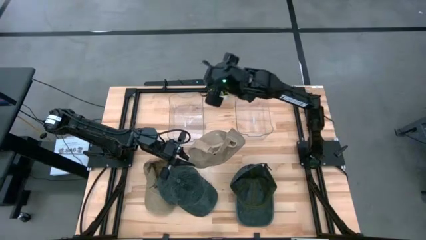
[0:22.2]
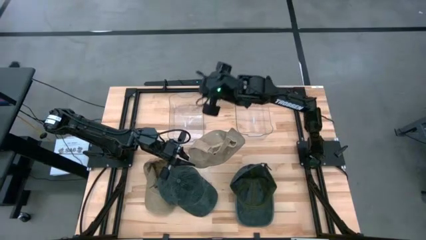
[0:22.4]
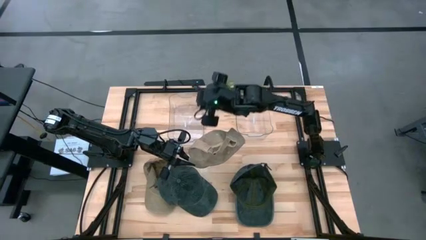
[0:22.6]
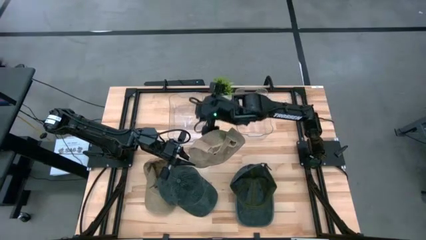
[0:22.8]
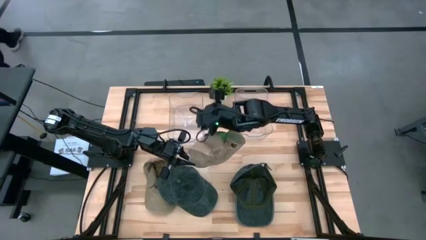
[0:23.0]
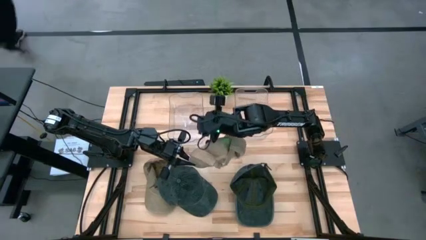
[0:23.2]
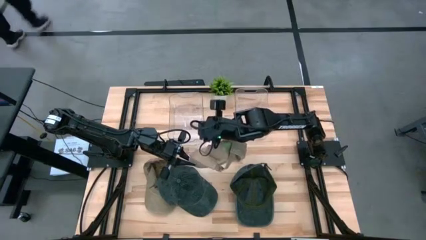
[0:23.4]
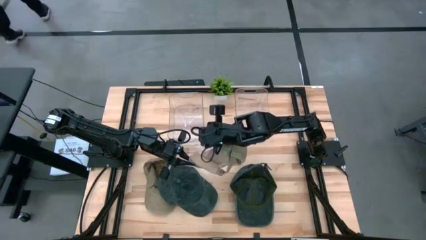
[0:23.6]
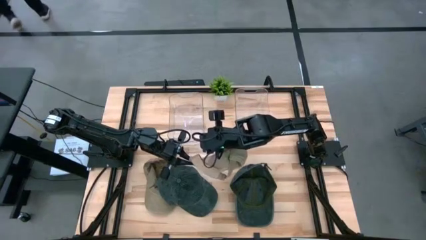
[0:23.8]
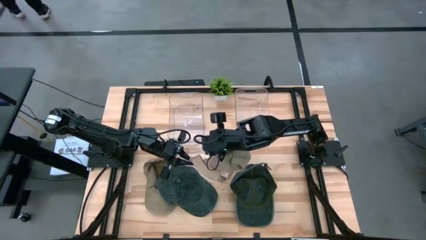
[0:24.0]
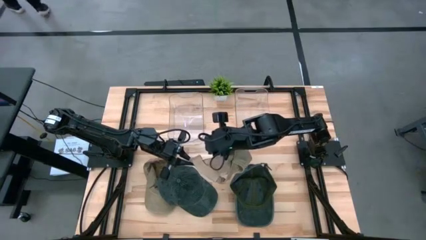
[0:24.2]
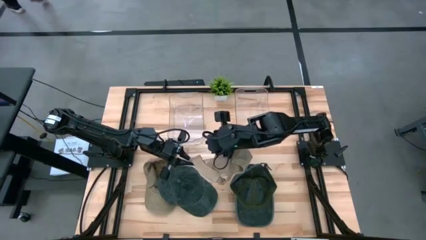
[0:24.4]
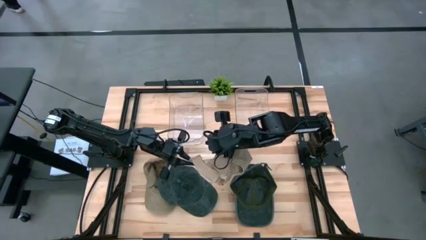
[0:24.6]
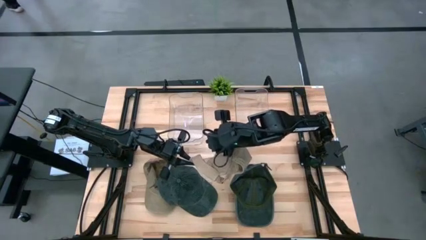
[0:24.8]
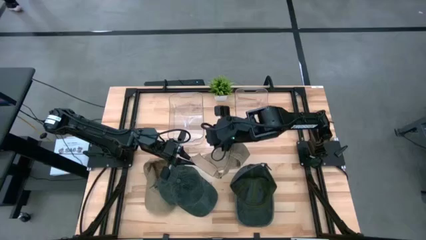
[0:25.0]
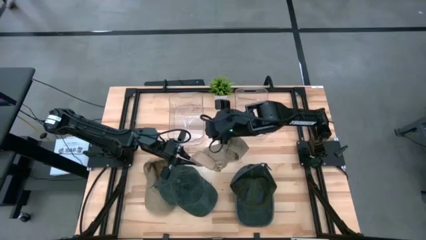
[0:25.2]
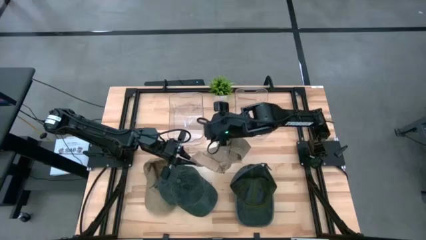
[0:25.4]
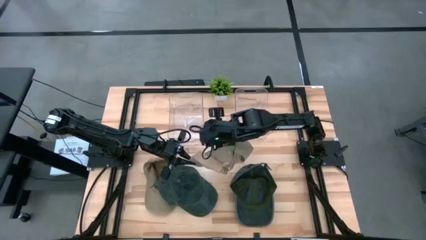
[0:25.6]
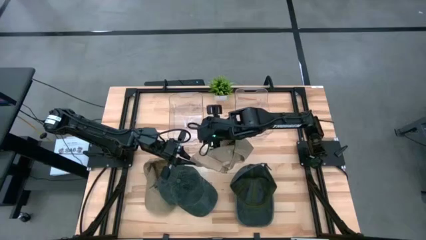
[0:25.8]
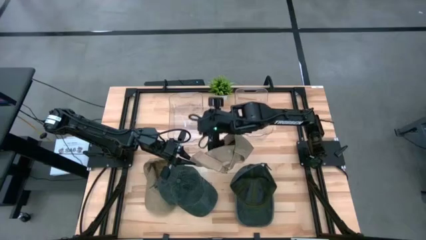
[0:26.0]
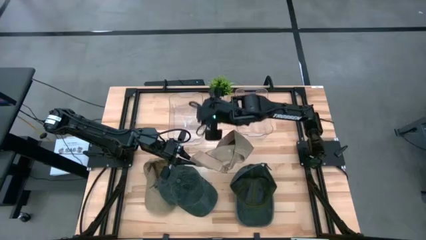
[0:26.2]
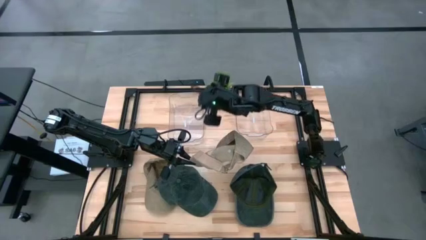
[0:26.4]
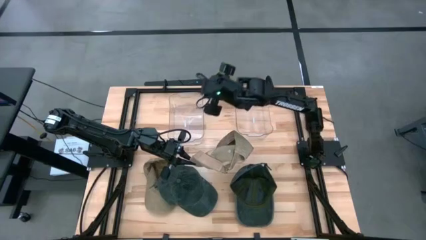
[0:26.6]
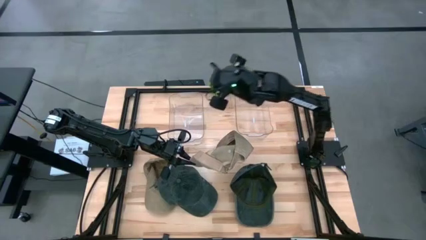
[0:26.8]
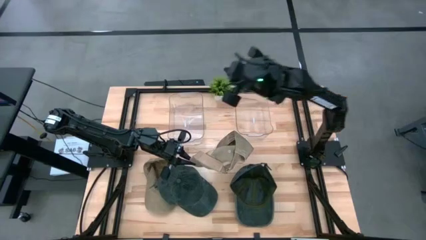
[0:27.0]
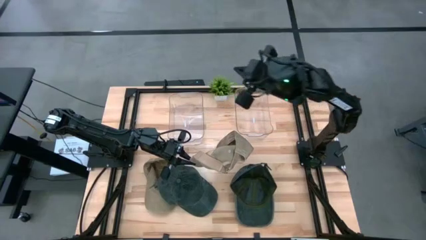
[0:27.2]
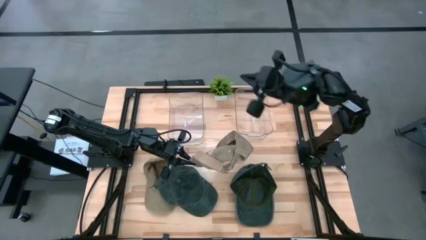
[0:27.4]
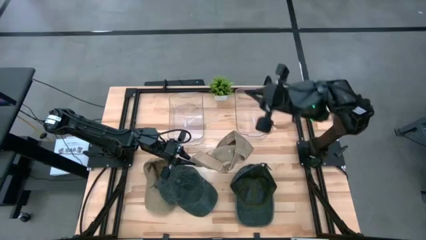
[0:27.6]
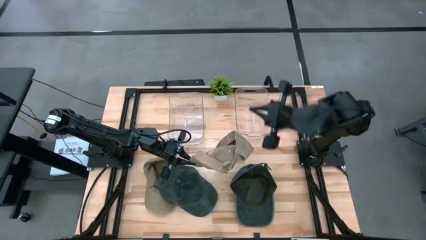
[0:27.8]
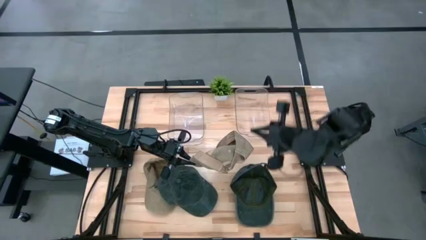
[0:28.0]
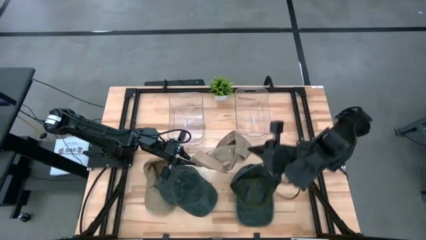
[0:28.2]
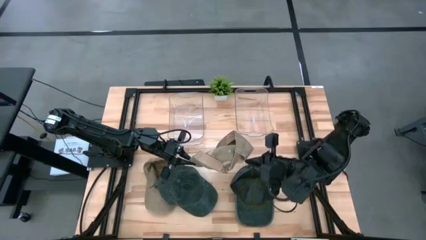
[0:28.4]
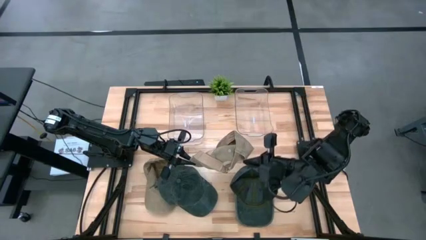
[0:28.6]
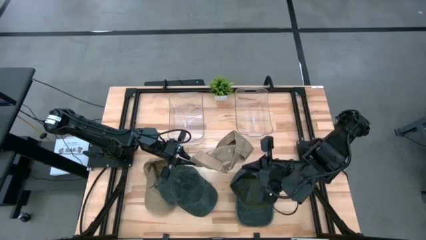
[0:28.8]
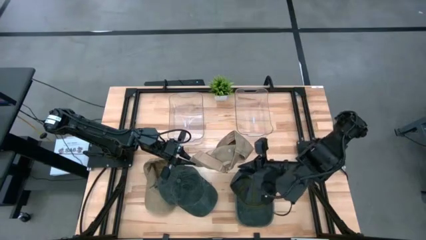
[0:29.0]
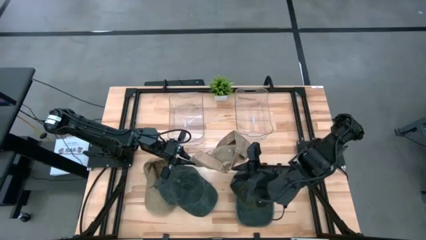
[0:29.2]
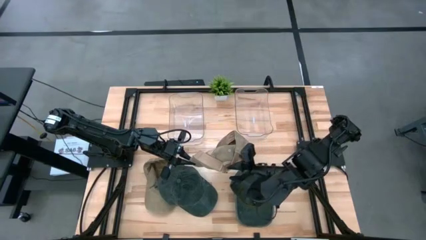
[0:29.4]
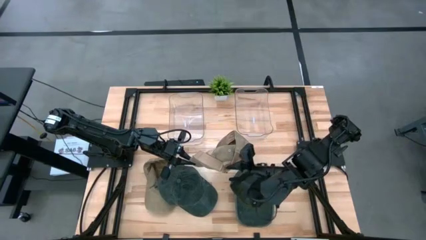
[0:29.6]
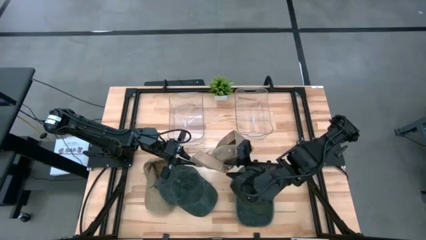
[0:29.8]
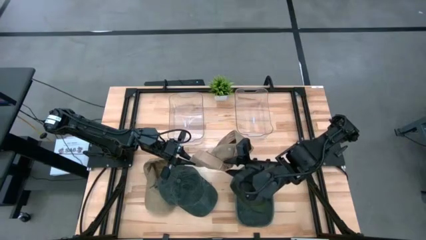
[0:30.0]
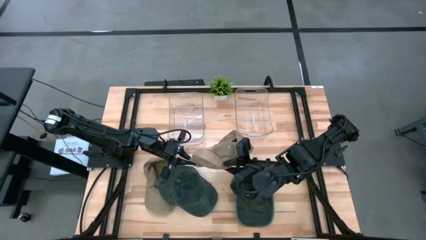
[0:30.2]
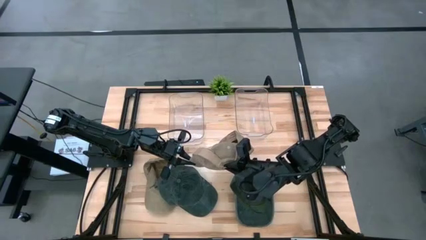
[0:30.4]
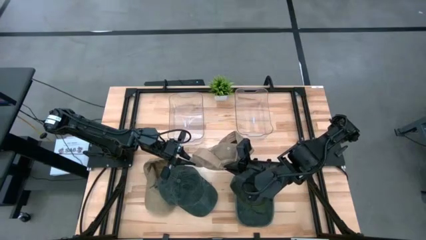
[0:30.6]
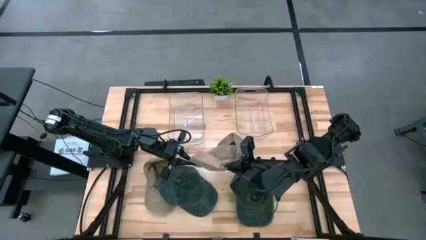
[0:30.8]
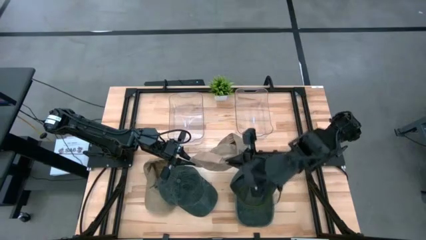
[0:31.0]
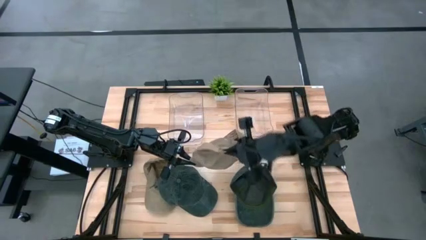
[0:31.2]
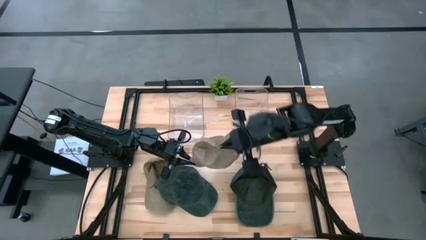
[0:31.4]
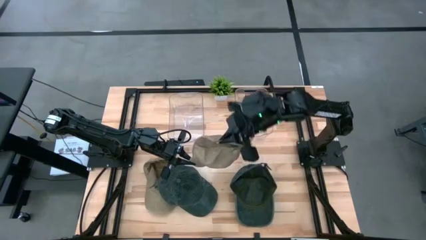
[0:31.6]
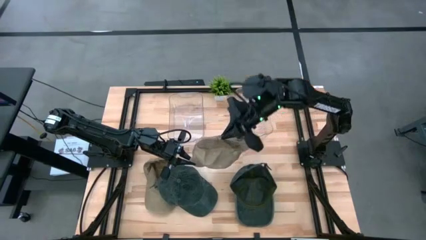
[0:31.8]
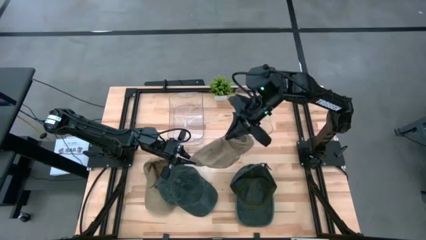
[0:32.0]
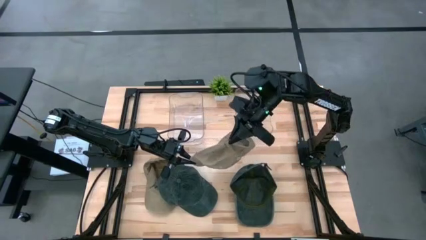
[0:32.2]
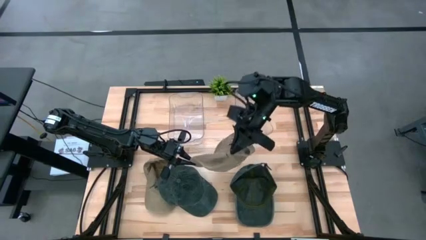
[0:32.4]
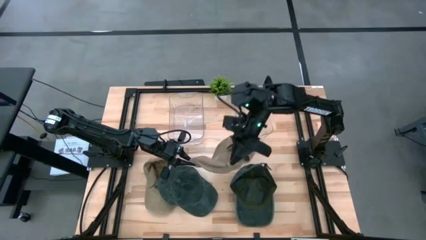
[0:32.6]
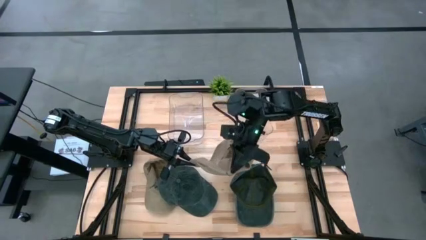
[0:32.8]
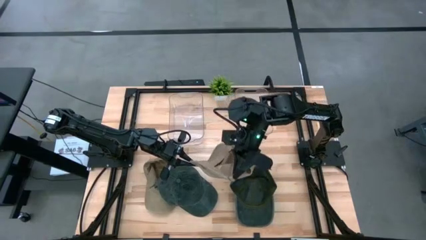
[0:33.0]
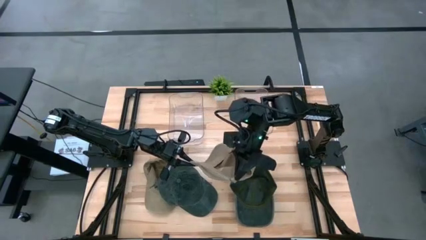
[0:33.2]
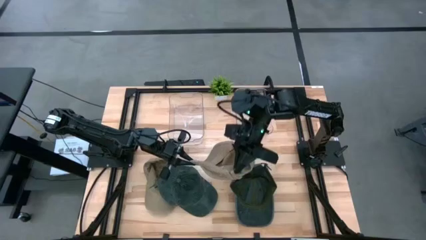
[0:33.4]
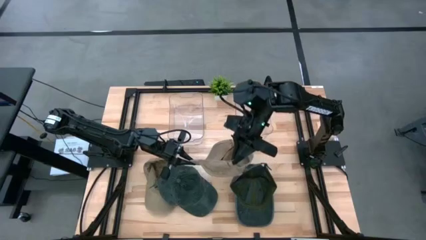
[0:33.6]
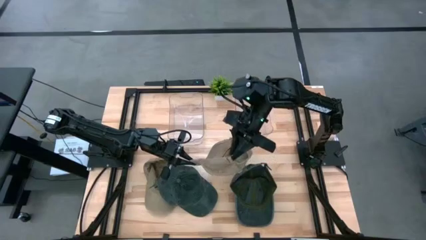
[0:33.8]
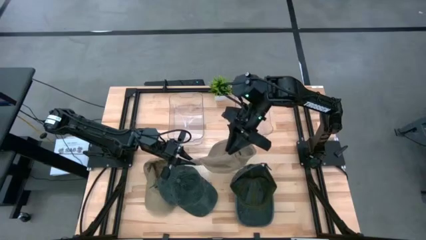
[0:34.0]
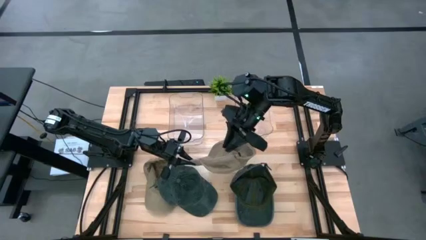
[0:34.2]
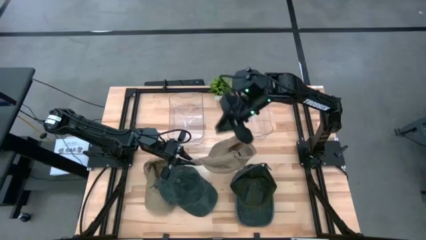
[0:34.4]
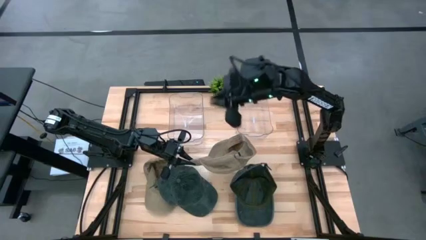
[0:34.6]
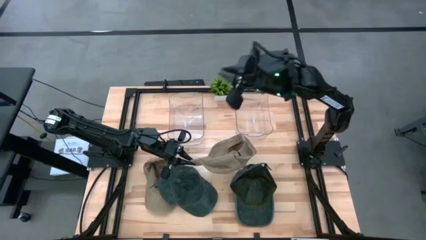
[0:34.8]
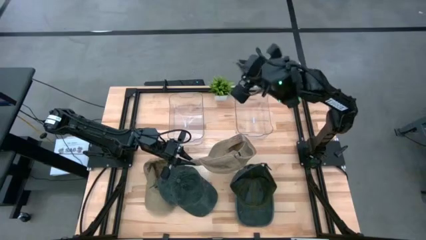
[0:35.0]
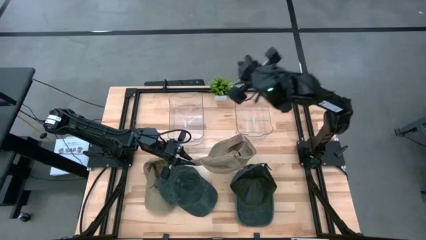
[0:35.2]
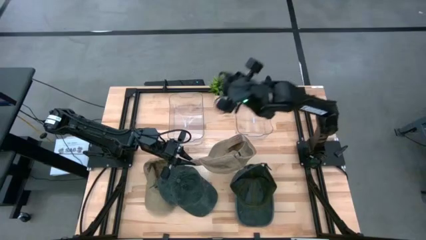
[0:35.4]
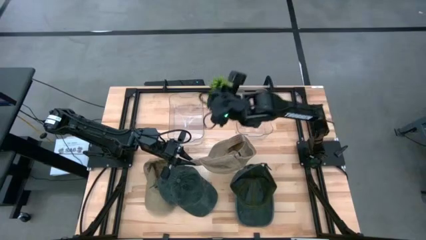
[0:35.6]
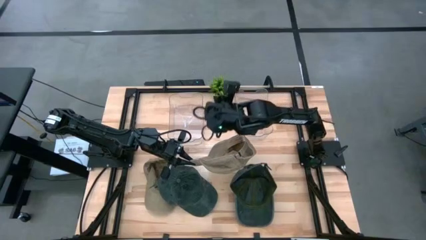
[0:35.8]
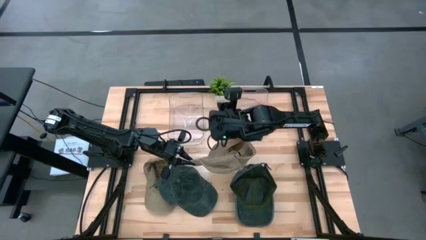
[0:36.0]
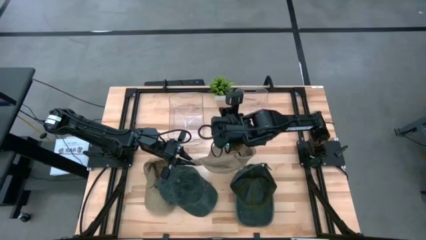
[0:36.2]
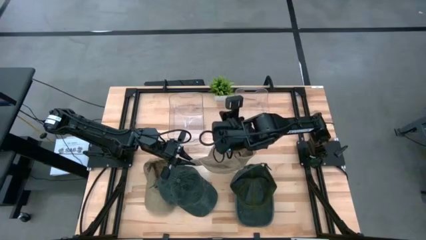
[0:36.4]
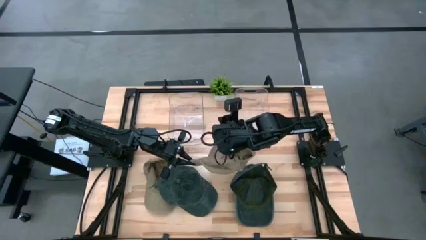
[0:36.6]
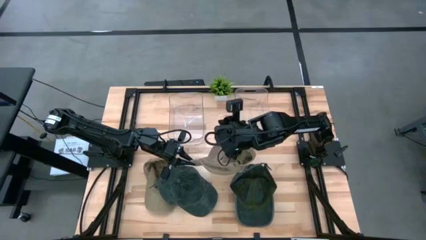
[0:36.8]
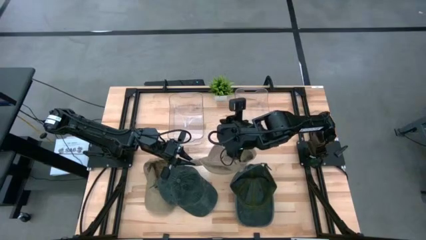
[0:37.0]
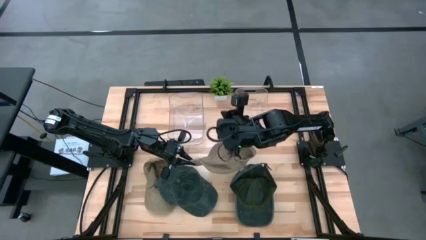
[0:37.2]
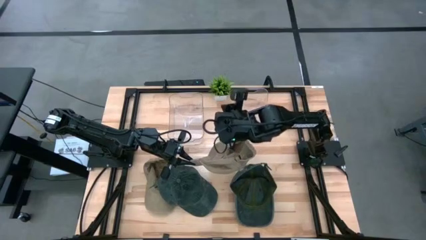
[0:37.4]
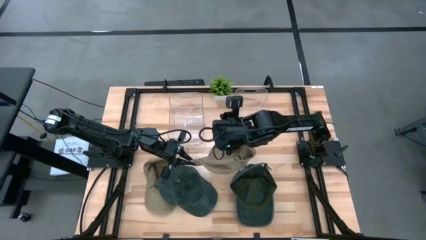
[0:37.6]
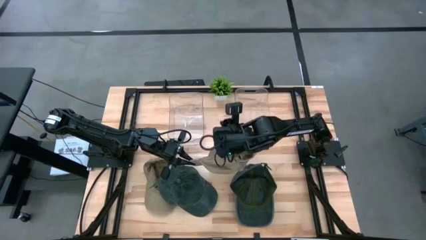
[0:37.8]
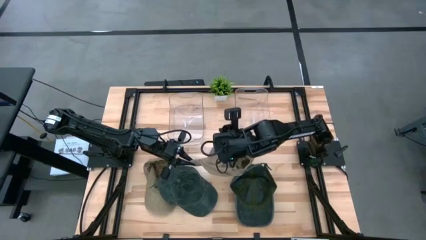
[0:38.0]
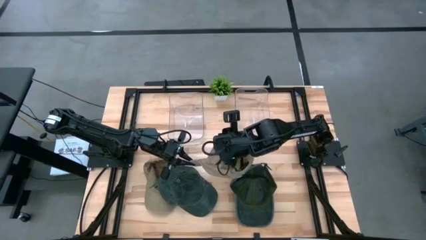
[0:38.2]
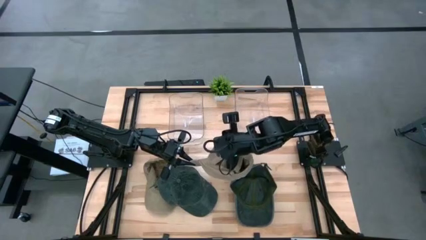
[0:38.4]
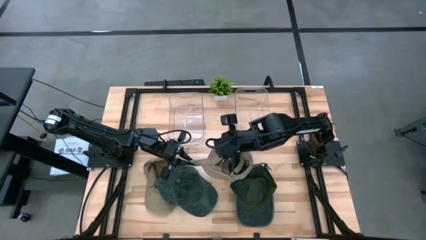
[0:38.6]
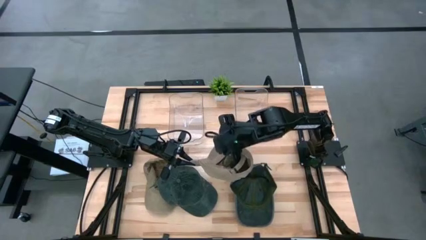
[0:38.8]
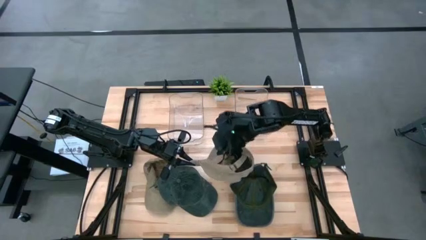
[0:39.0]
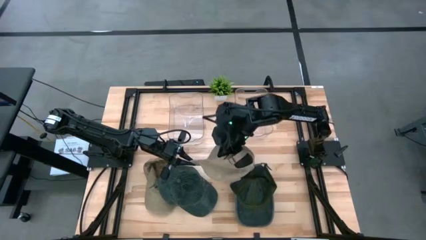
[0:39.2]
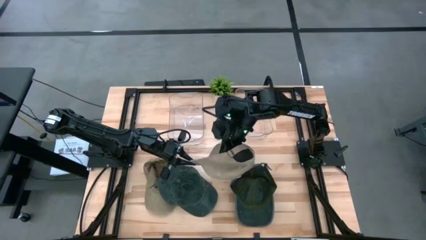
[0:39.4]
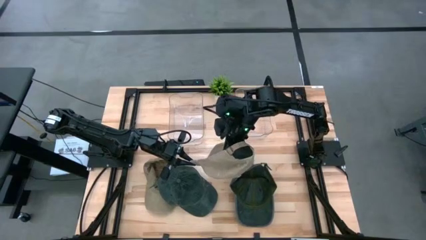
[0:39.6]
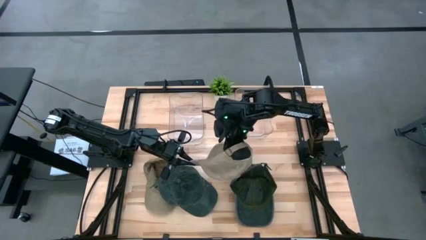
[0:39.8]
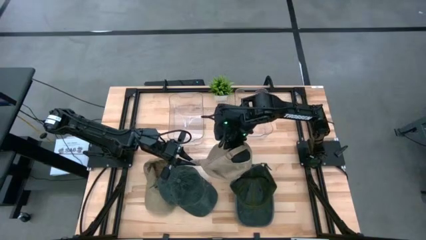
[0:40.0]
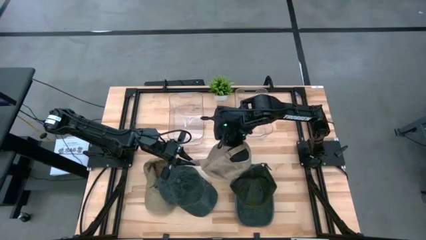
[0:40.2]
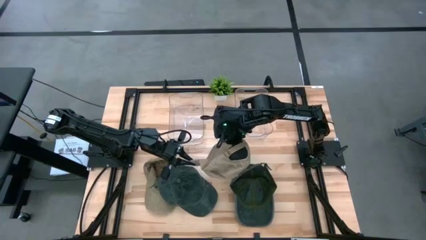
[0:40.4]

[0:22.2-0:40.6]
Task: Pick & Place hat
Put the top brown cap into the right transparent bin
